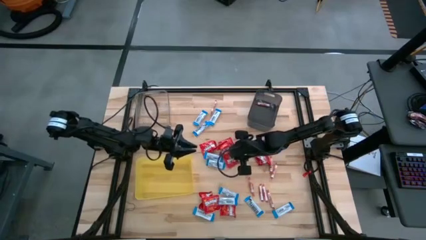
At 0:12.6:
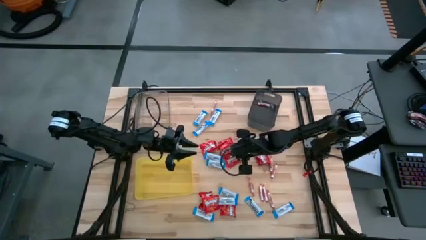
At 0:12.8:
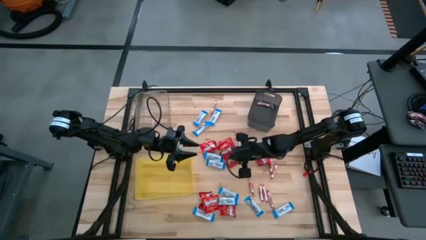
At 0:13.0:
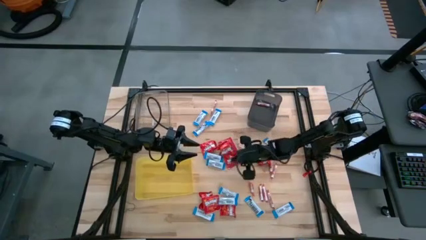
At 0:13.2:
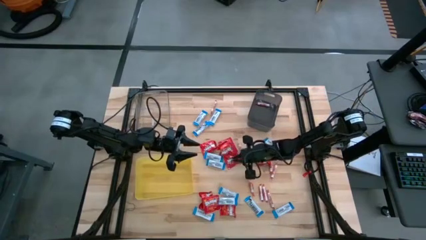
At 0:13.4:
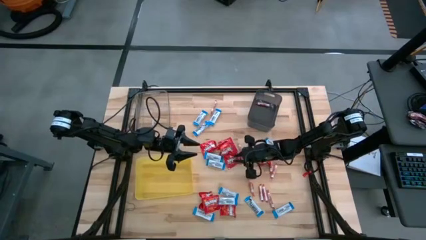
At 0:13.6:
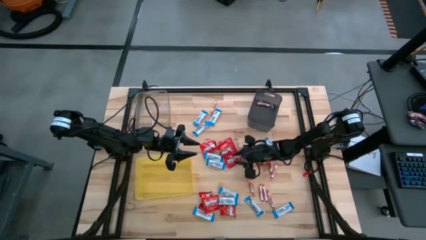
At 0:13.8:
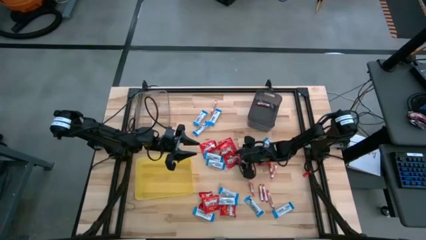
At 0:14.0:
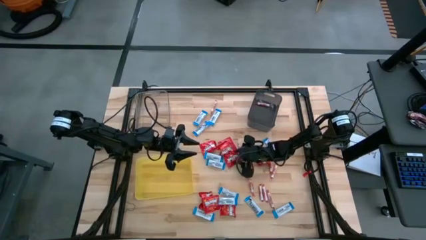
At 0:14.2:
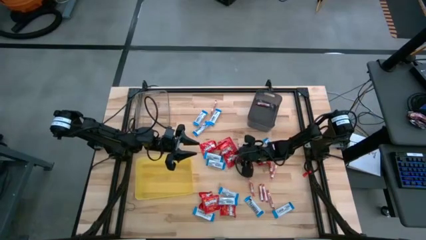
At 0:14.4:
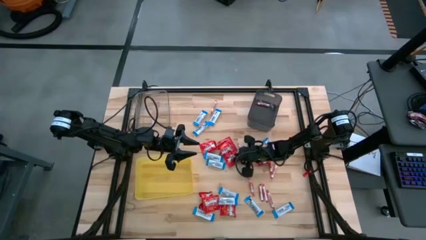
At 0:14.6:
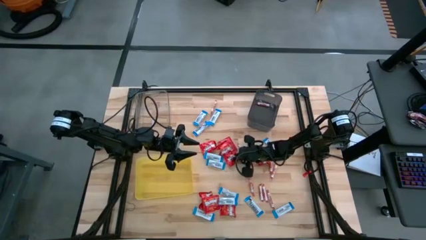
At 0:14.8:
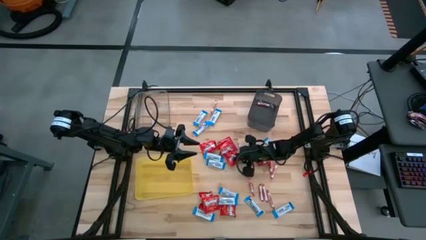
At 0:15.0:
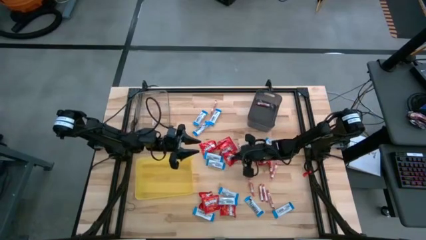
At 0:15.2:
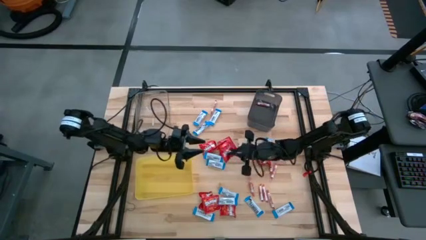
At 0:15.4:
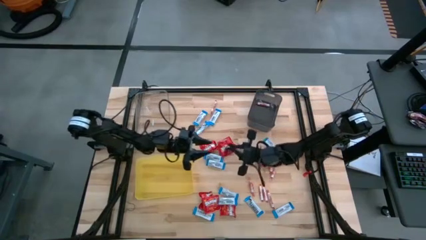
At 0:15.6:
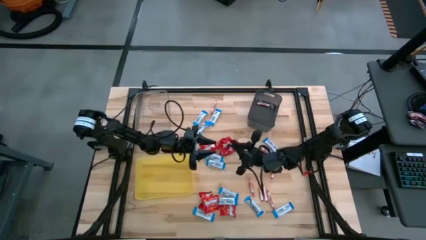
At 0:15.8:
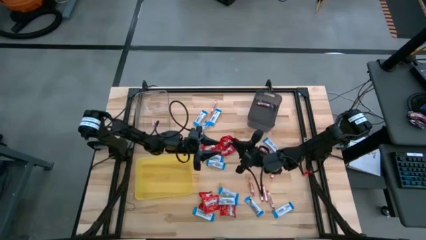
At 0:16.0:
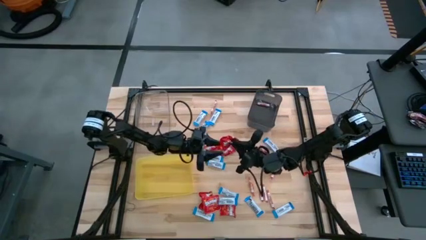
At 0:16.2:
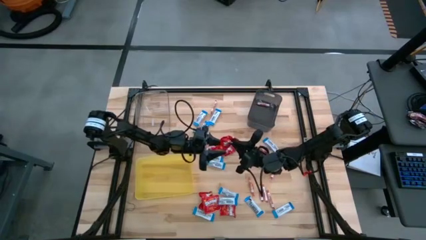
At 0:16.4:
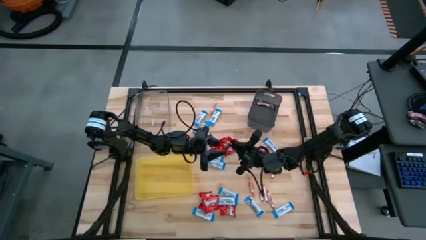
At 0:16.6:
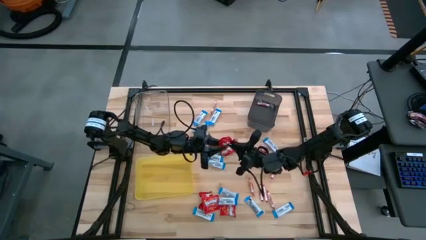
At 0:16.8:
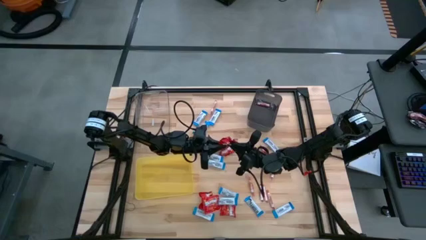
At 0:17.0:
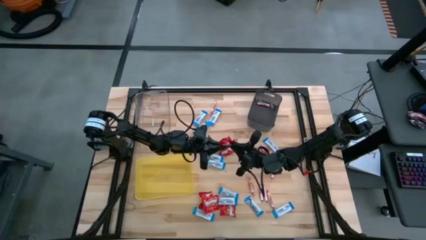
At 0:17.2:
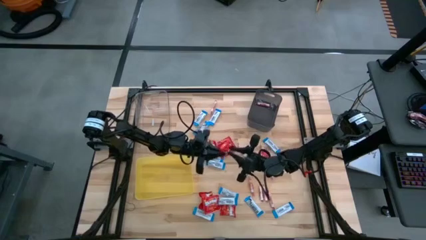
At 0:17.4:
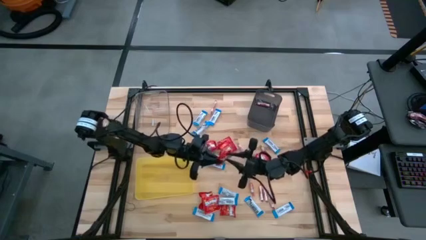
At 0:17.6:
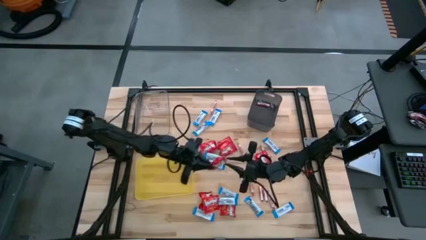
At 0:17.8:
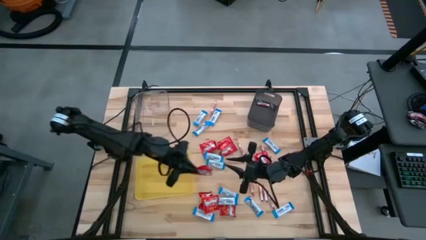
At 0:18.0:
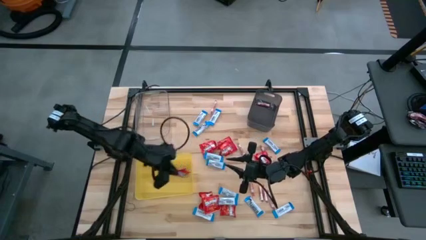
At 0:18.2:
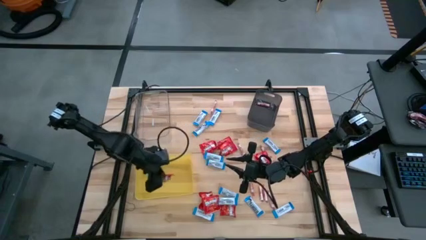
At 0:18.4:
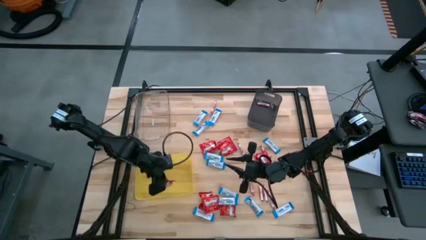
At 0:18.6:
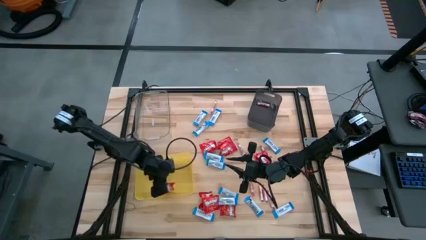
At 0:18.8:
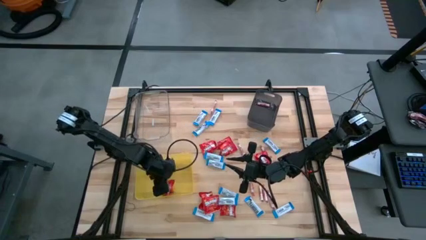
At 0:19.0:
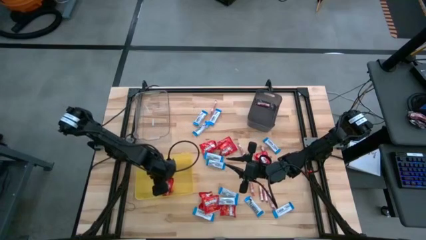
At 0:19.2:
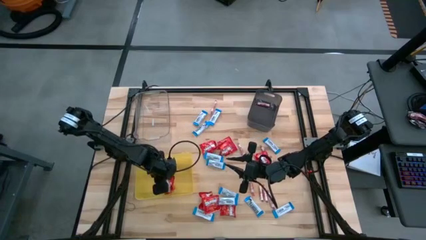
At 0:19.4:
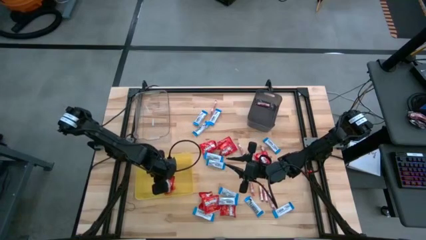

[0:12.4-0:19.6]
Task: Sort candy
Put the red chocolate into the yellow bin

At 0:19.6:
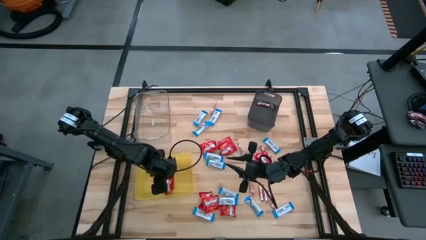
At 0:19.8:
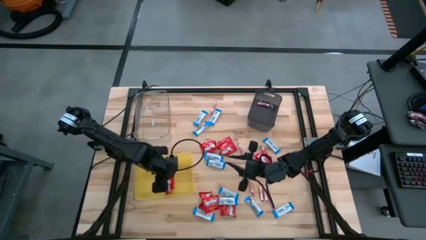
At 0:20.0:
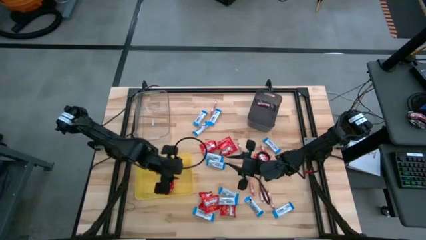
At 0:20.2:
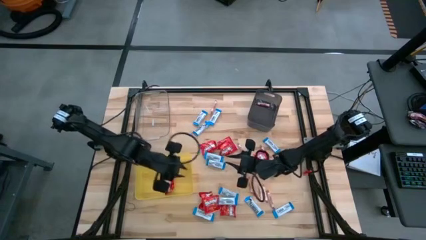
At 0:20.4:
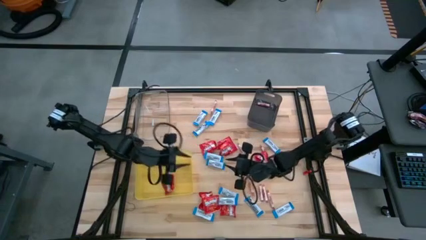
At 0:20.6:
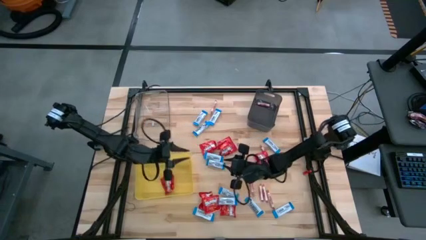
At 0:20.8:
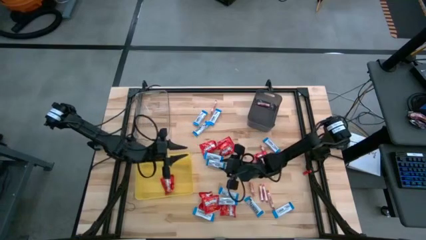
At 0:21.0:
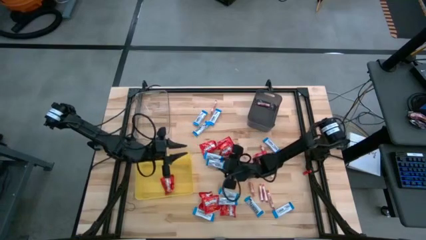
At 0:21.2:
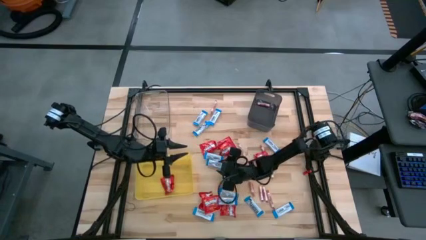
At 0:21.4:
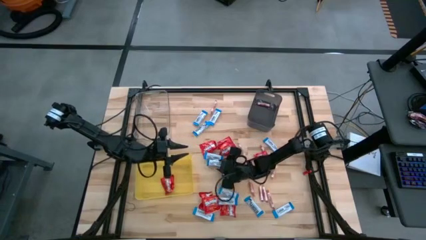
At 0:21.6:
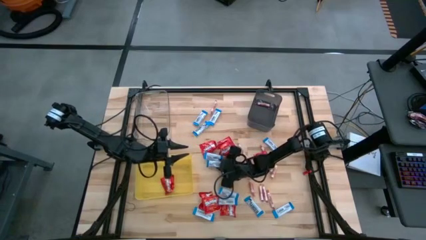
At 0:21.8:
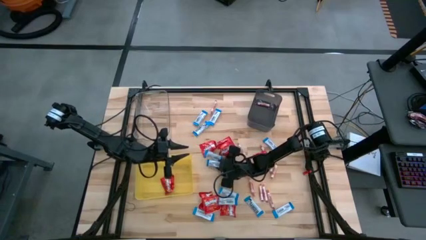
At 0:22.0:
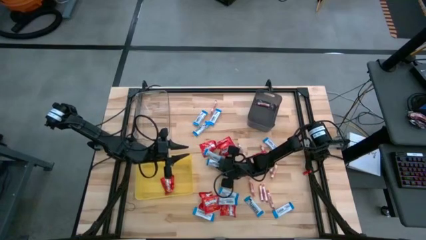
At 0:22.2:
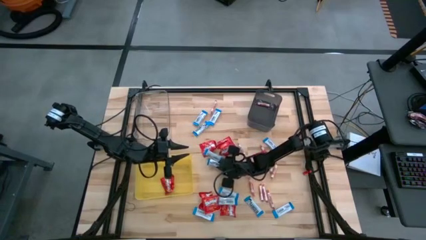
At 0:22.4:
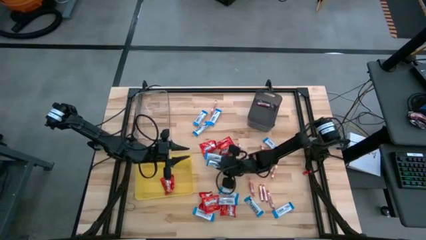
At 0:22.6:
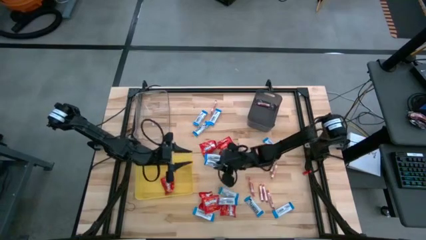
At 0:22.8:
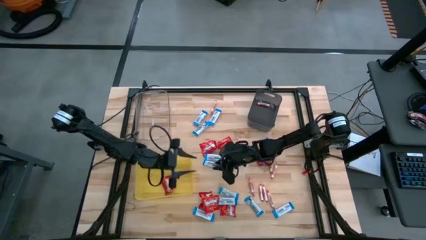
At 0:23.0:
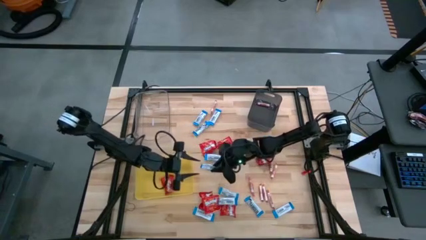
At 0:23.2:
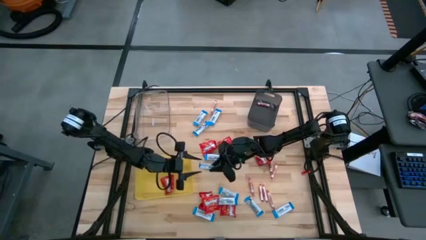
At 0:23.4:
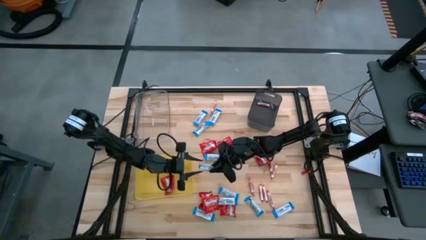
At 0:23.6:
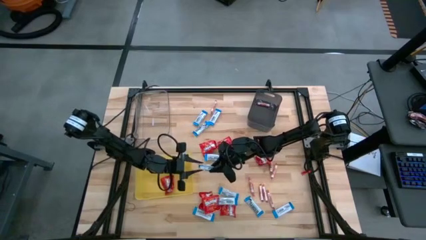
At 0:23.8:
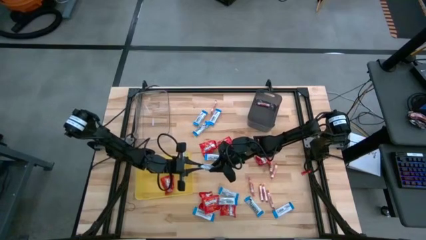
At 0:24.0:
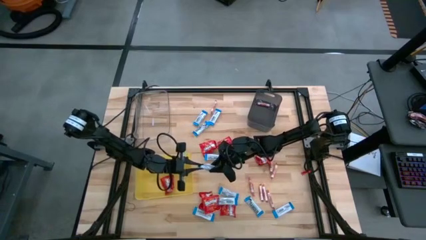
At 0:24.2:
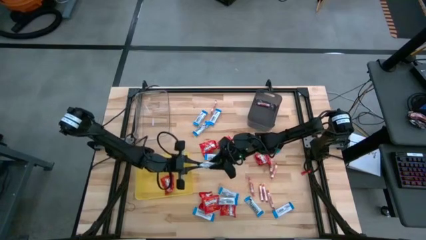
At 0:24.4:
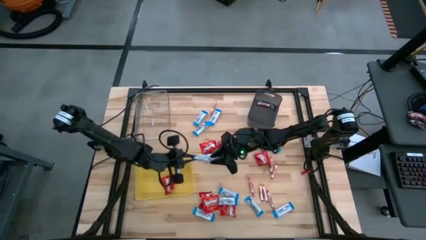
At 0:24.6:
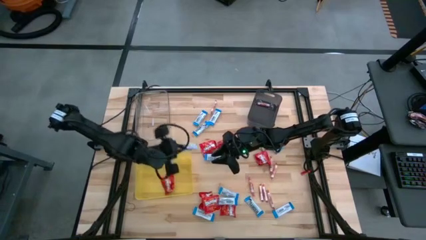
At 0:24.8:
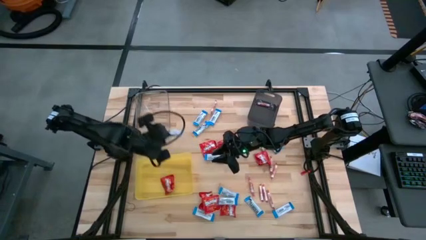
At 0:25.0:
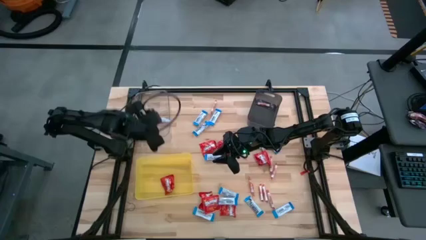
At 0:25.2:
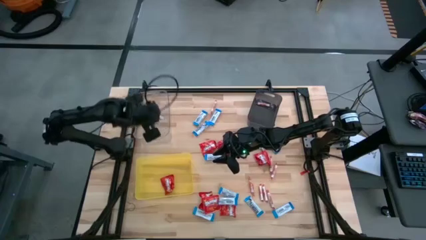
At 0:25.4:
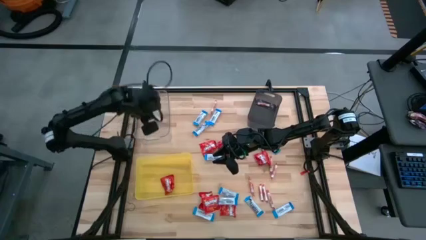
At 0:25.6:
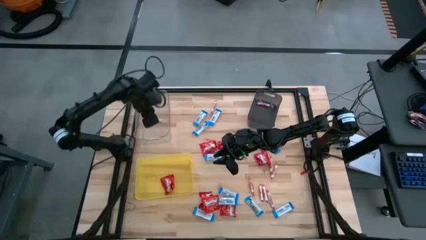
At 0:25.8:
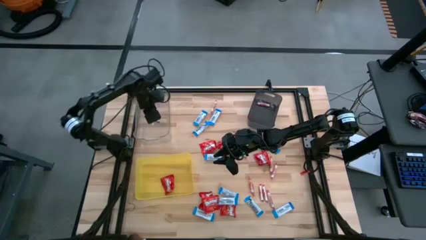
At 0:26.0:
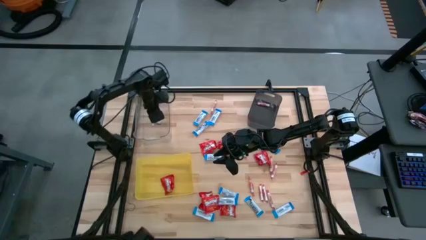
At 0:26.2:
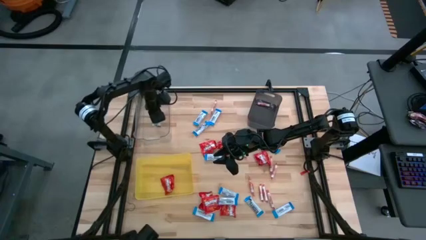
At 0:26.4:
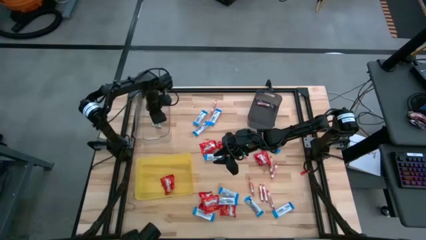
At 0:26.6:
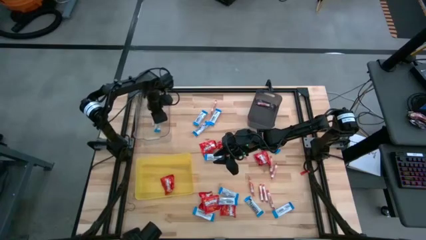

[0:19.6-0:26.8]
Put the blue chocolate into the transparent bin
